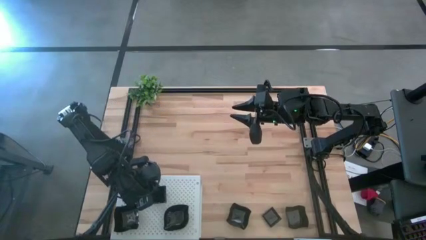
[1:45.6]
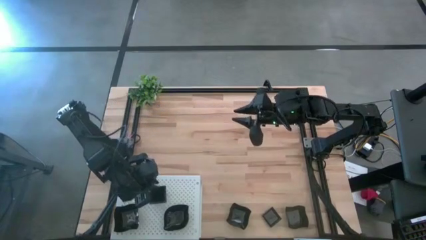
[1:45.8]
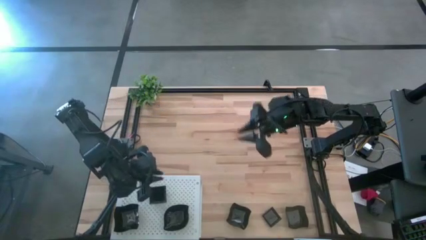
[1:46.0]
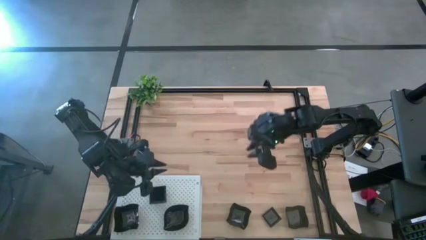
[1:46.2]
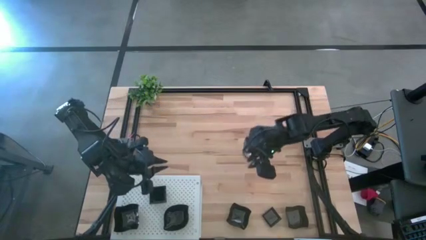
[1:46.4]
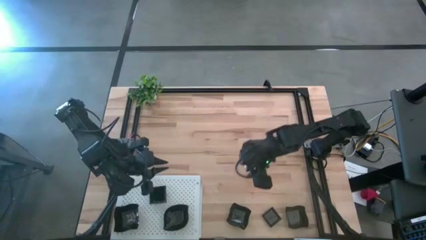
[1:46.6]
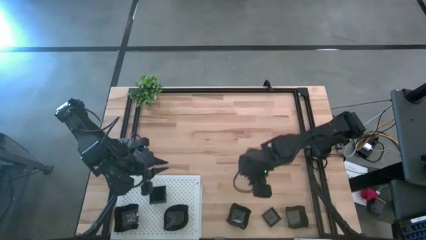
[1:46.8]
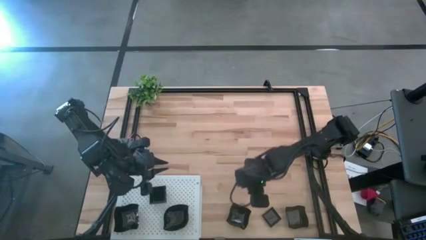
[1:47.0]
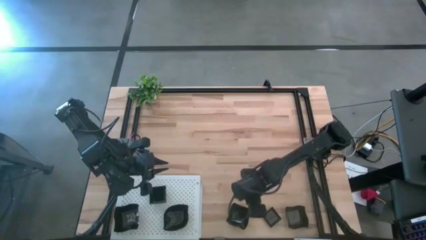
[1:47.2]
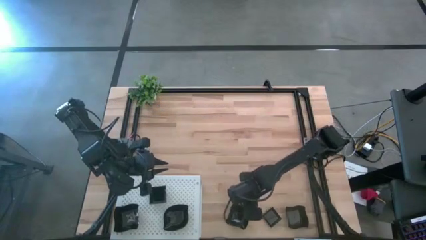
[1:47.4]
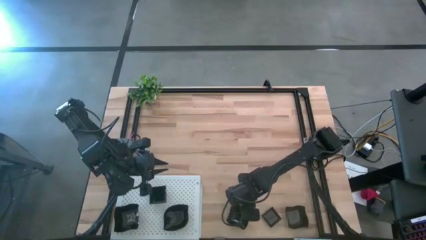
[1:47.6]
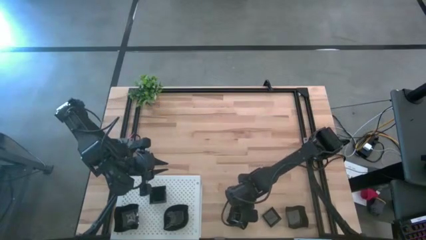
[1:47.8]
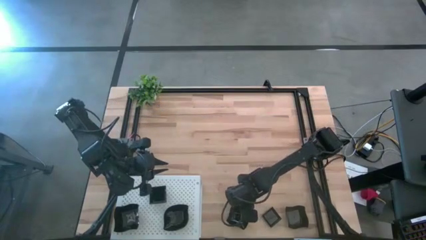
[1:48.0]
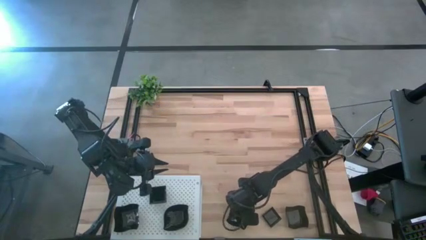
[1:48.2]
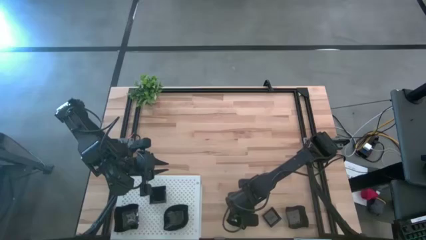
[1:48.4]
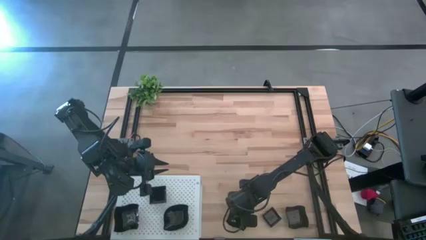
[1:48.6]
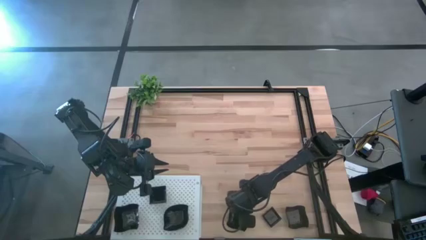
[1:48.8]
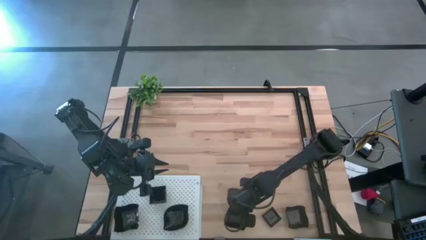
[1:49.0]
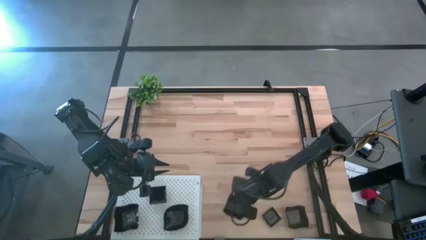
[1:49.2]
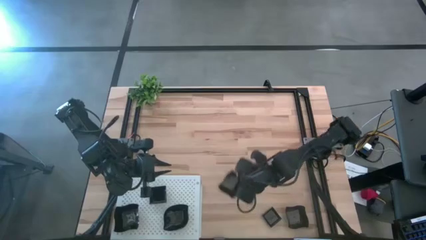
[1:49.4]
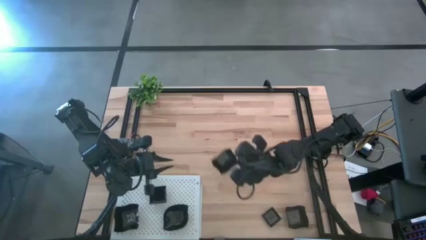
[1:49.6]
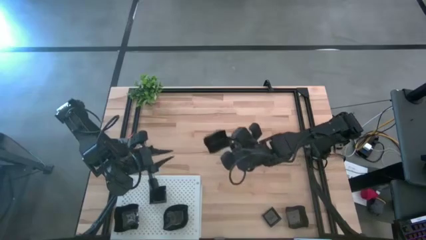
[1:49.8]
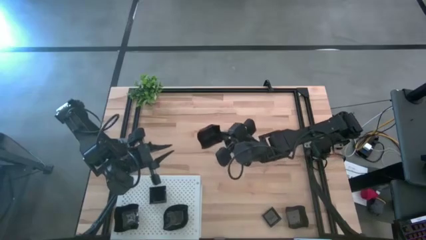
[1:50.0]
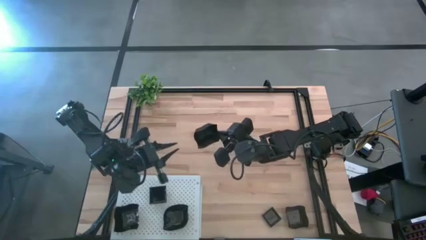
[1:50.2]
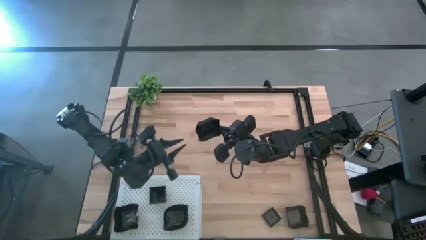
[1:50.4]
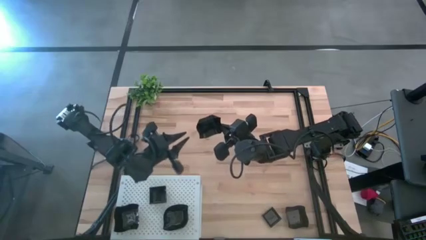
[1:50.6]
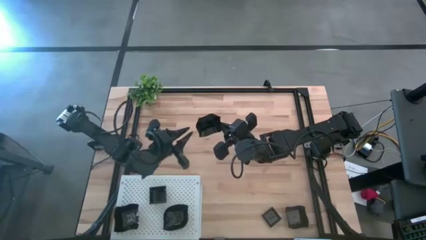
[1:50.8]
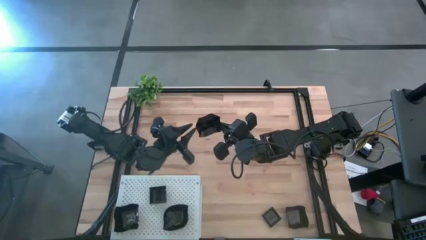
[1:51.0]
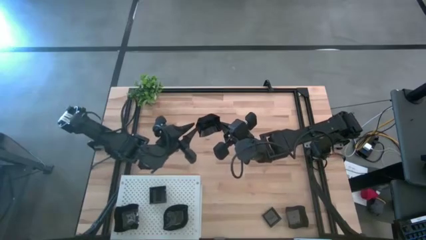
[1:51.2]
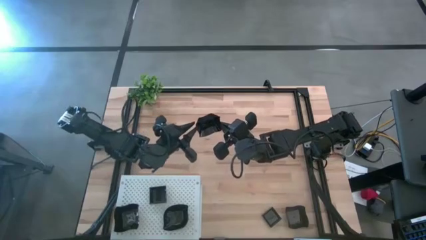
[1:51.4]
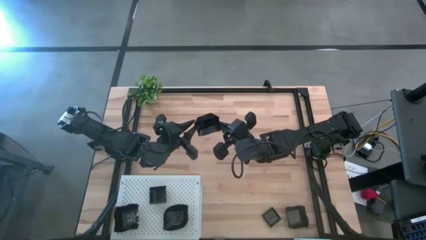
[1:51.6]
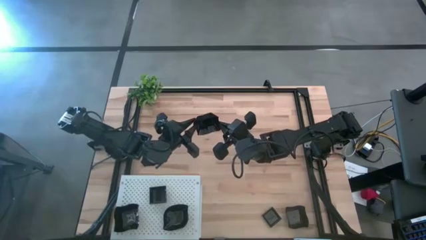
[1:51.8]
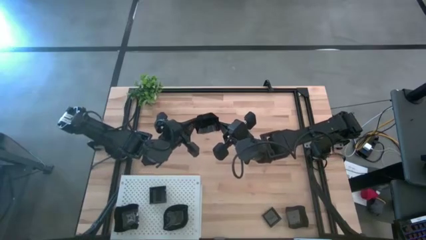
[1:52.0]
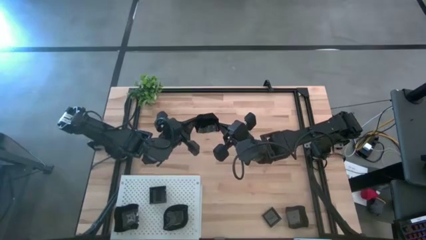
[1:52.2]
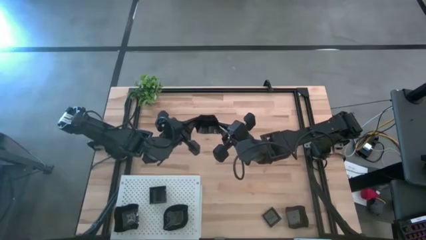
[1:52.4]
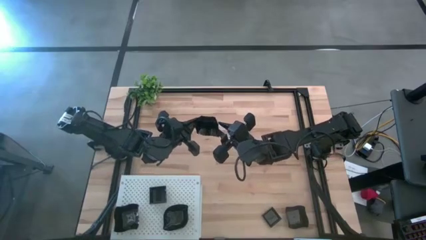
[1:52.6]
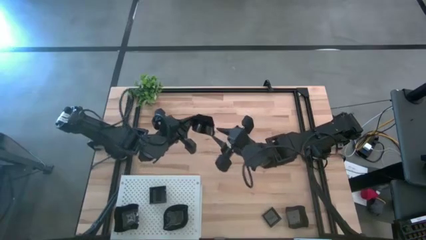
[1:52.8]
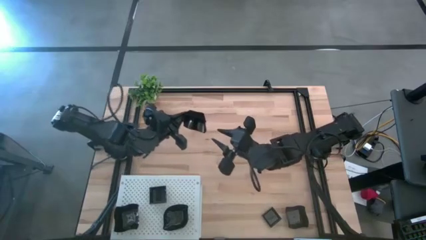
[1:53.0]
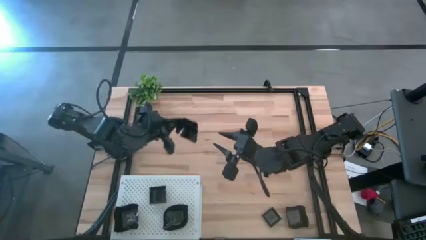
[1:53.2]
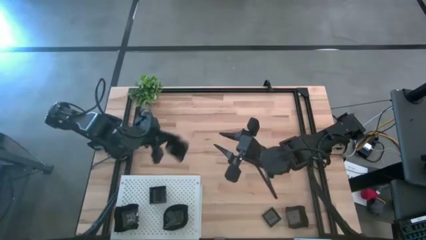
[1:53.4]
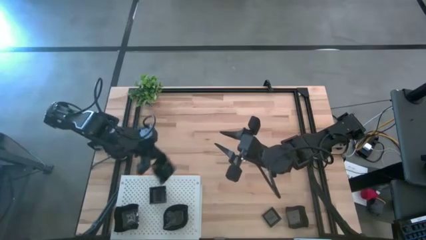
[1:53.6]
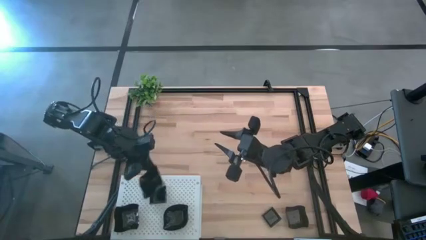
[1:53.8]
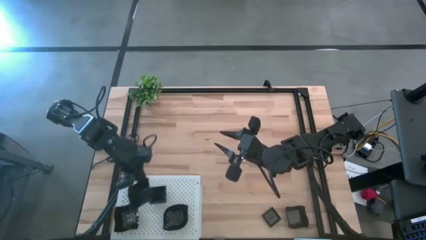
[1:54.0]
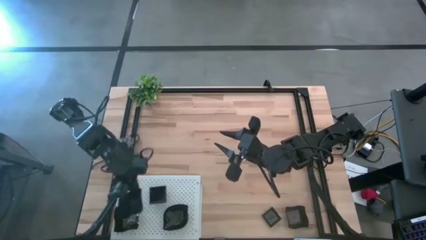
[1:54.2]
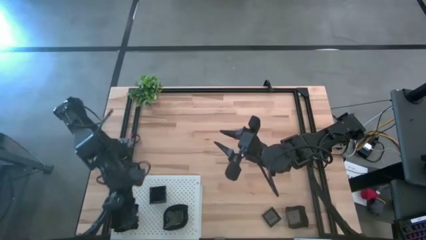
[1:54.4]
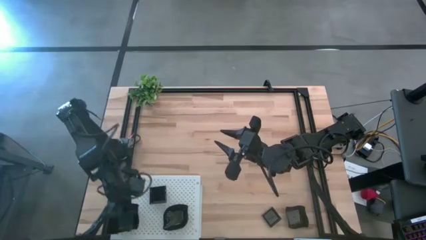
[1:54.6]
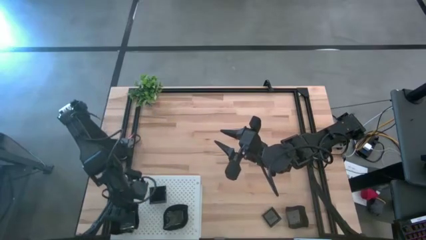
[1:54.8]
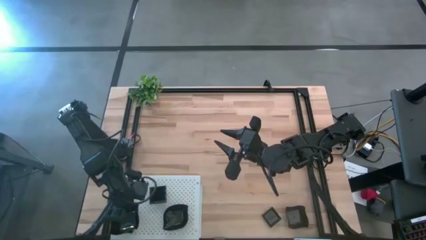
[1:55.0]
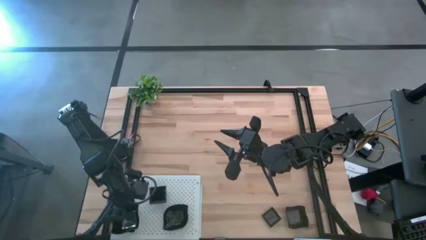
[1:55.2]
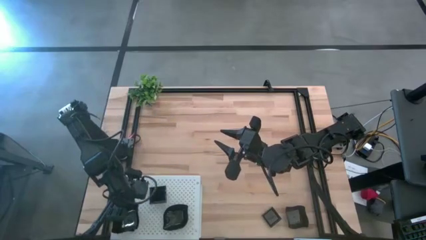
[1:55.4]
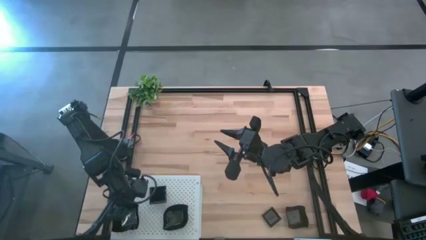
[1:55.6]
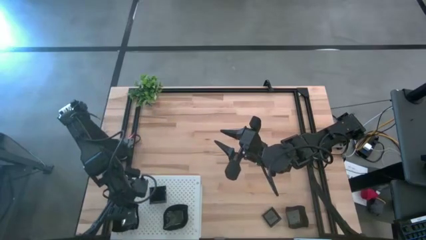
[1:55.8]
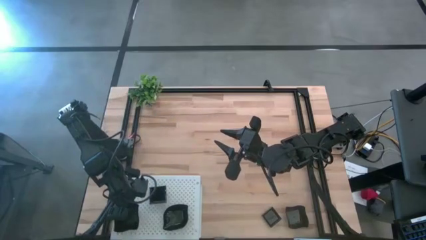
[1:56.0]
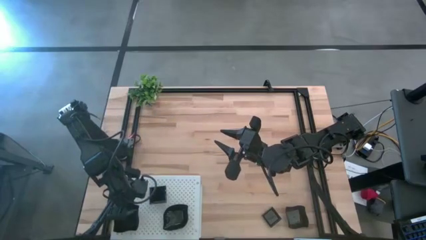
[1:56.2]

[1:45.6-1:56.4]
Task: Pick & Place Mini shaped plates
Stack the distorted square plate on top of the distorted square plate on the shelf
